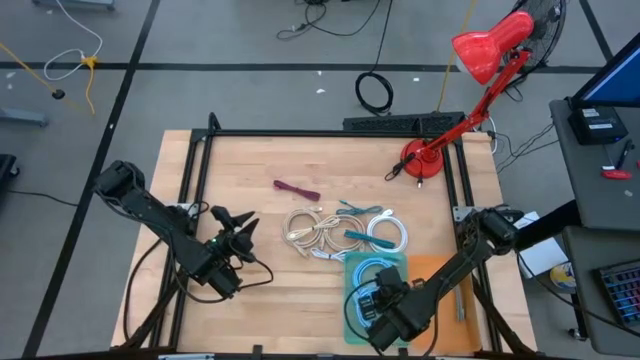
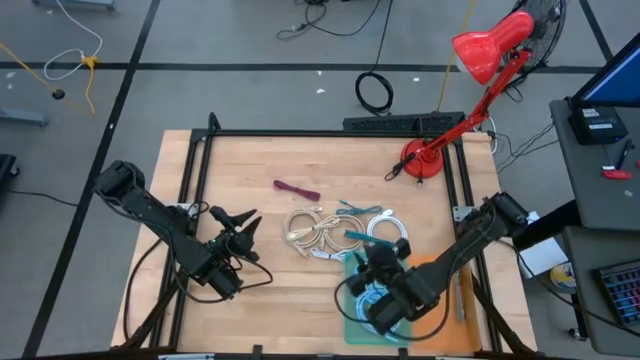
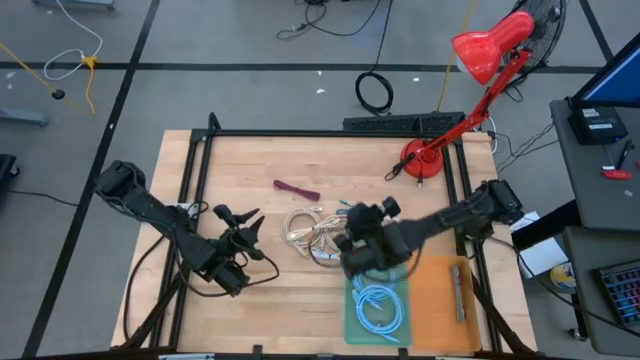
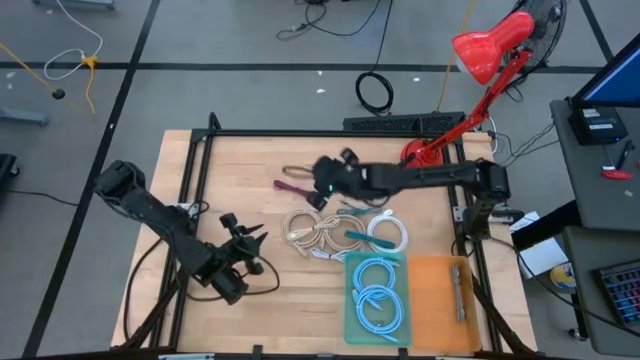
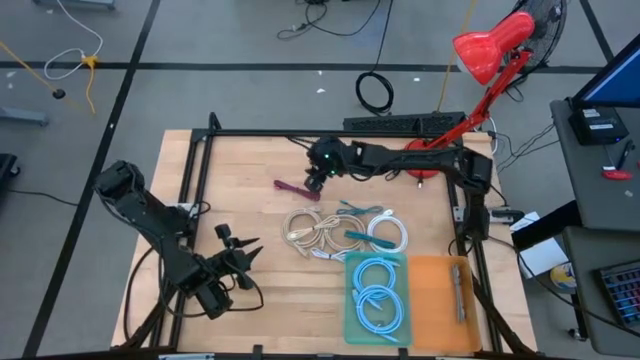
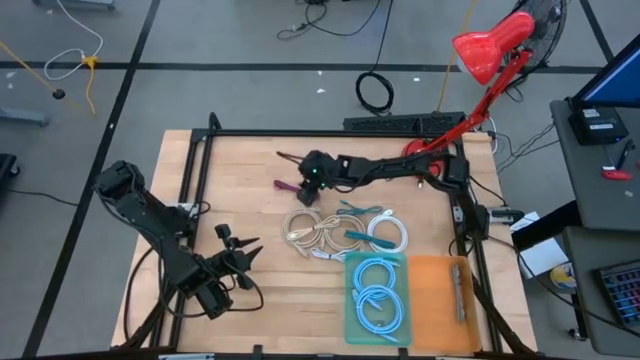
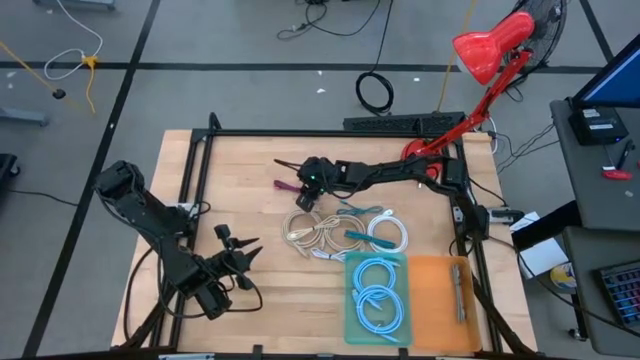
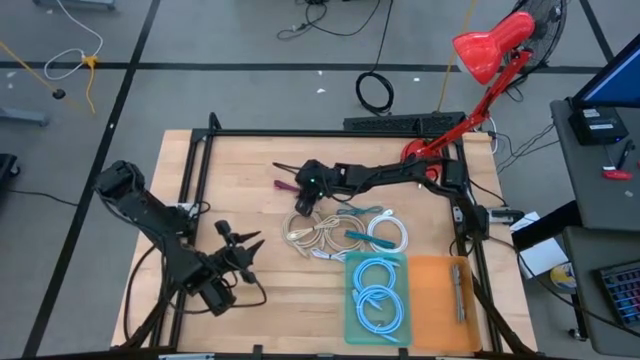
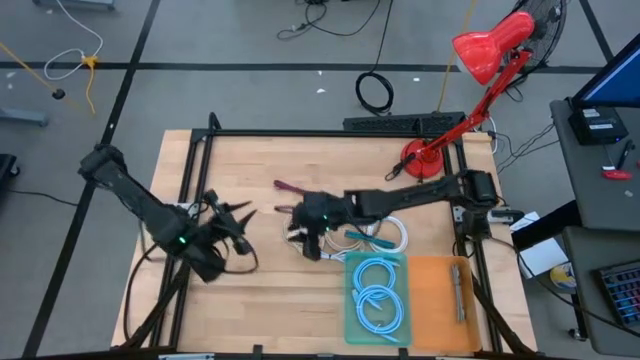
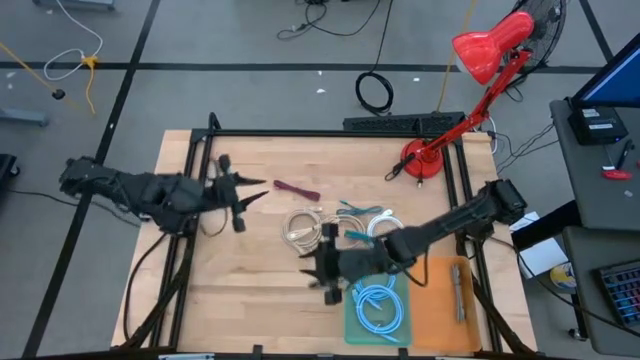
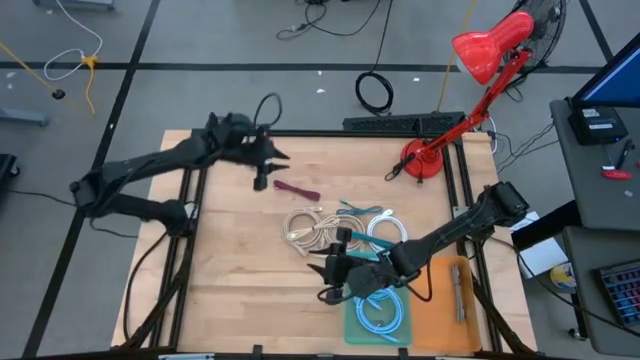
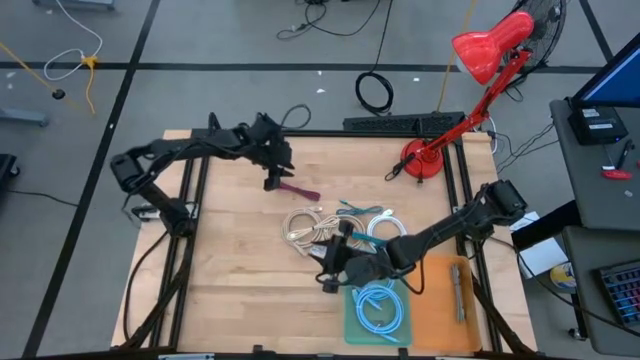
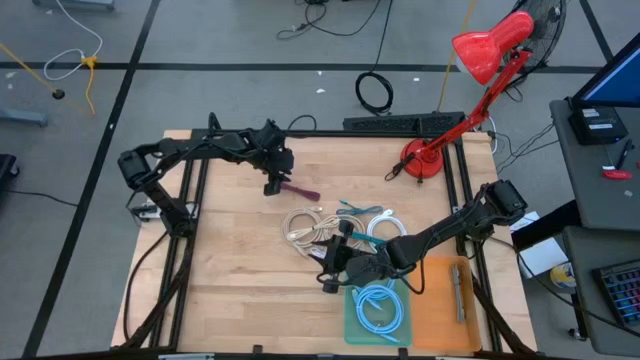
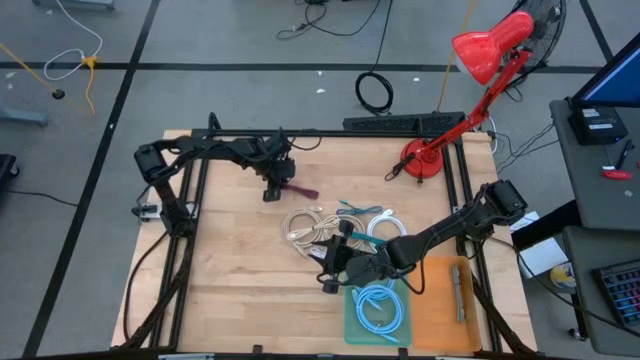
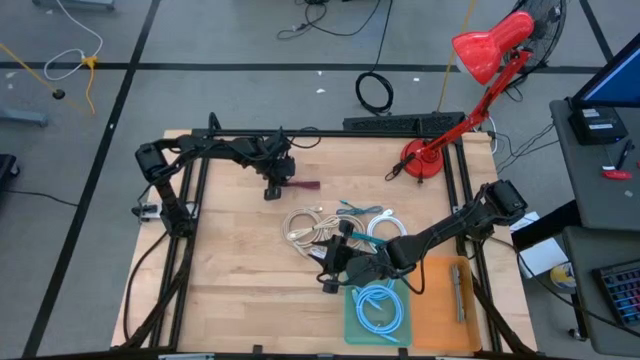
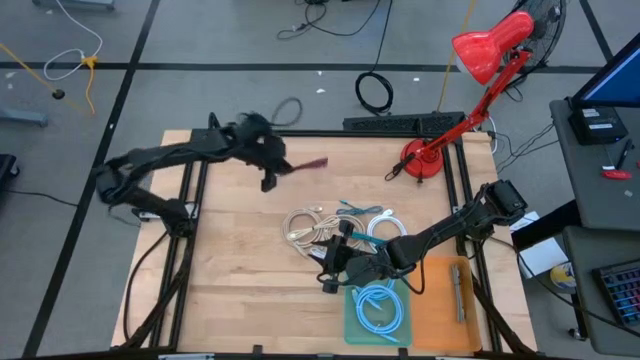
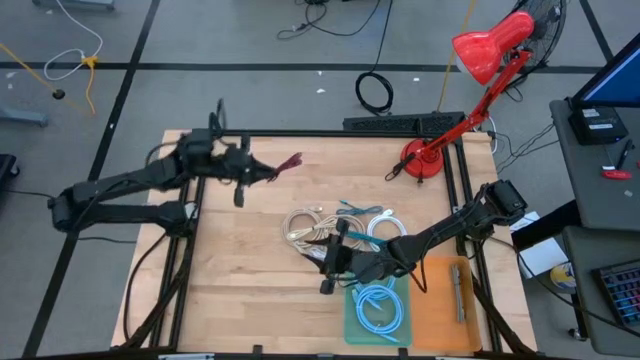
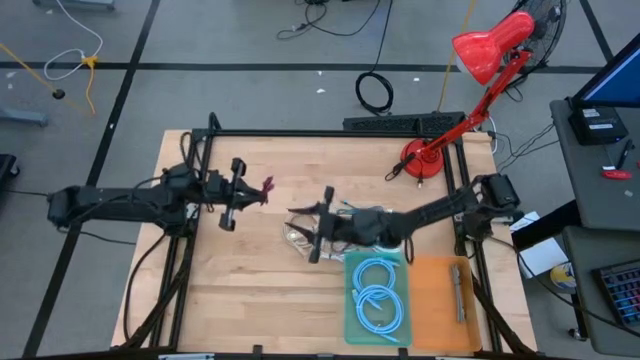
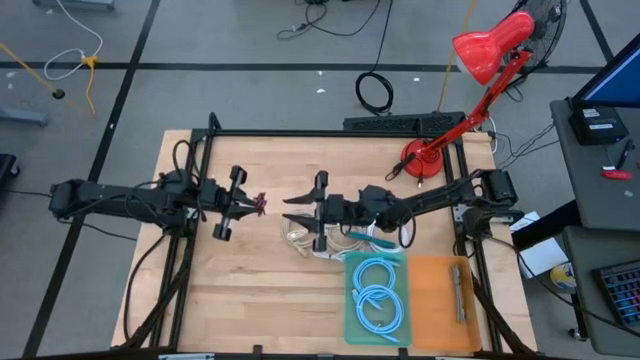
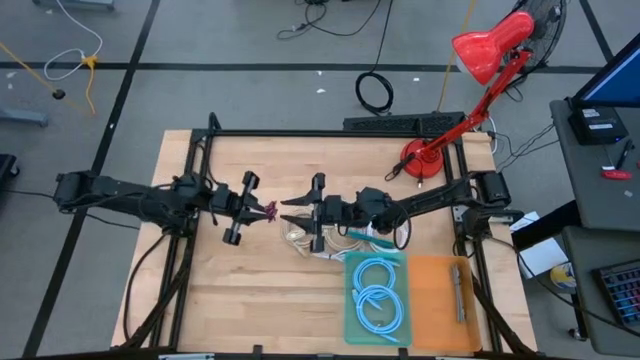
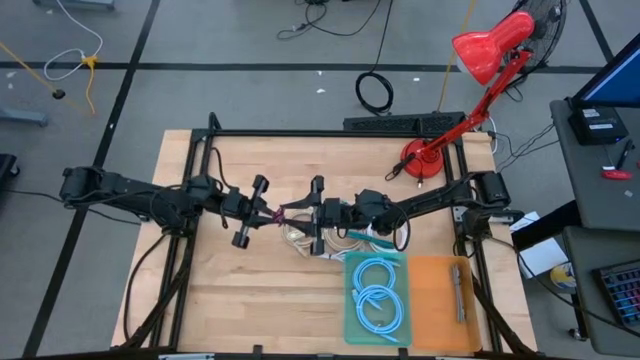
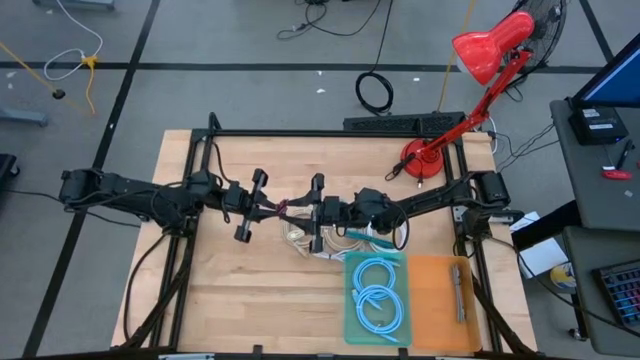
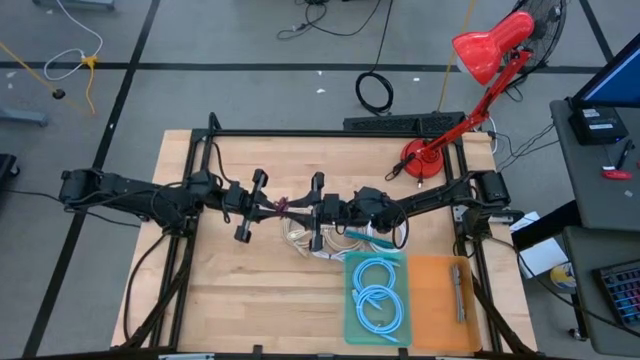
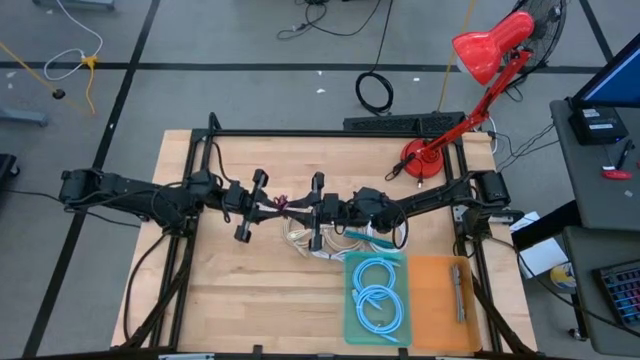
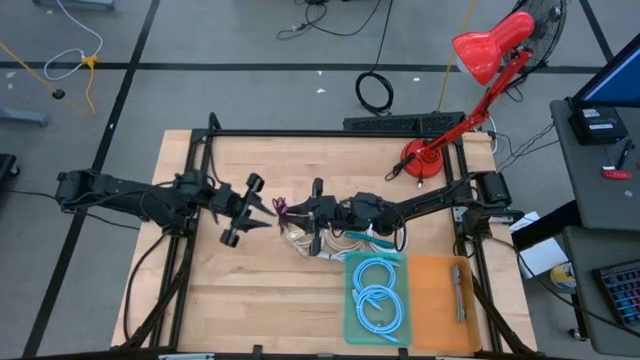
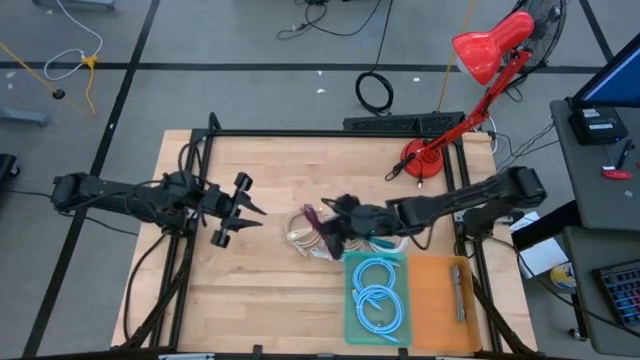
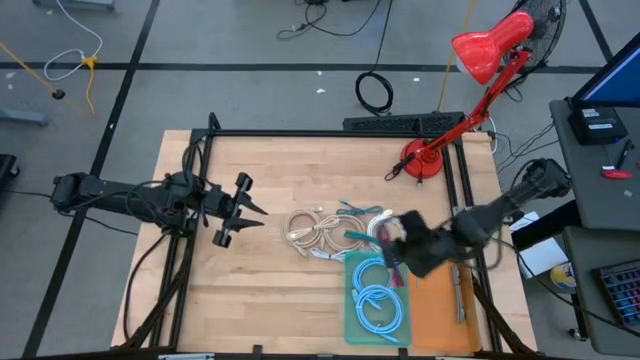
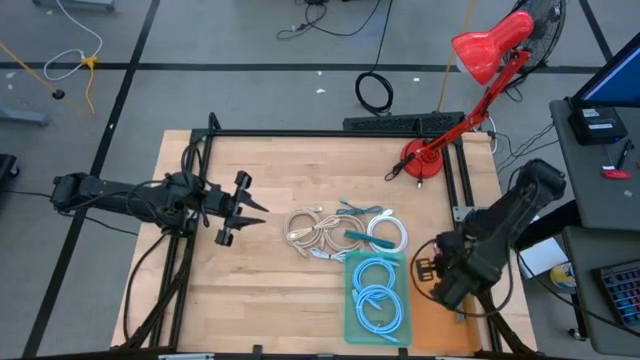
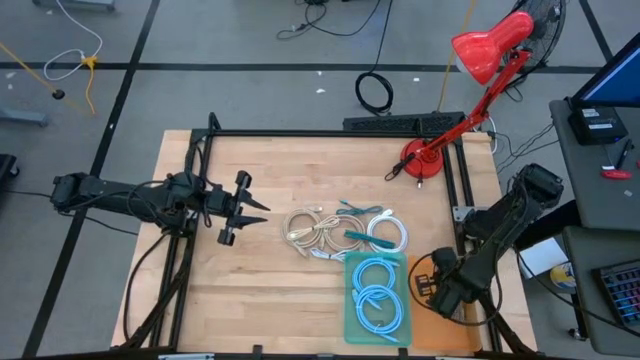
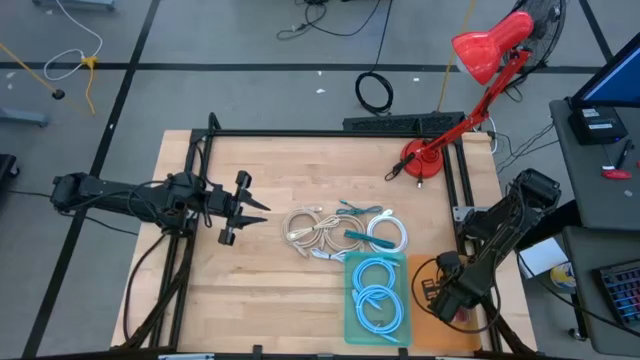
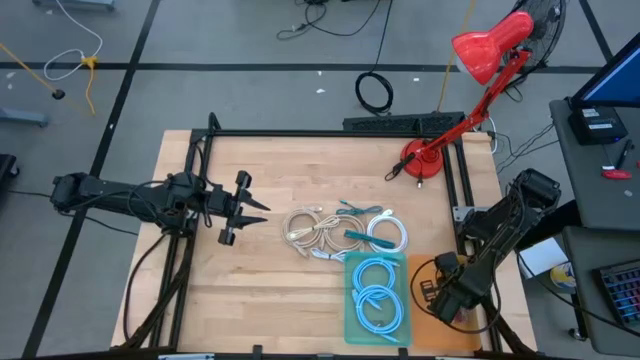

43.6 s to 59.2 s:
Task: Pick & Place USB Port
Put the pink charger cable into the orange bin

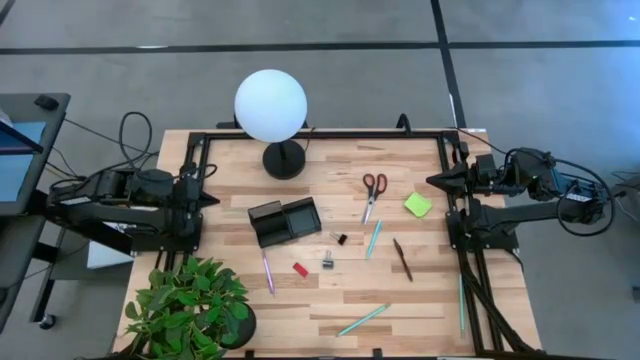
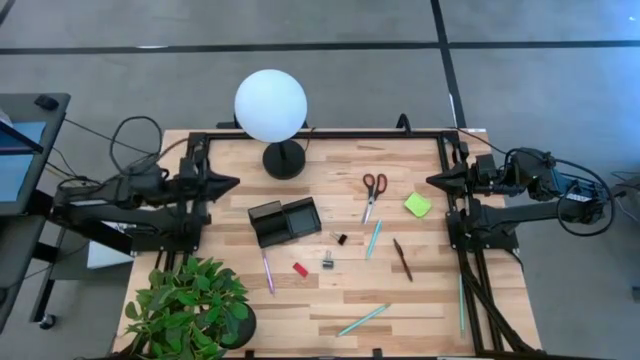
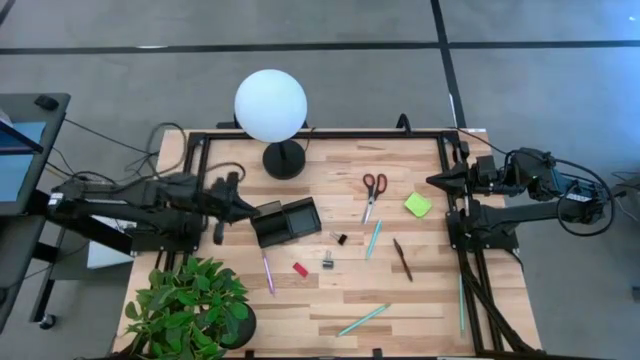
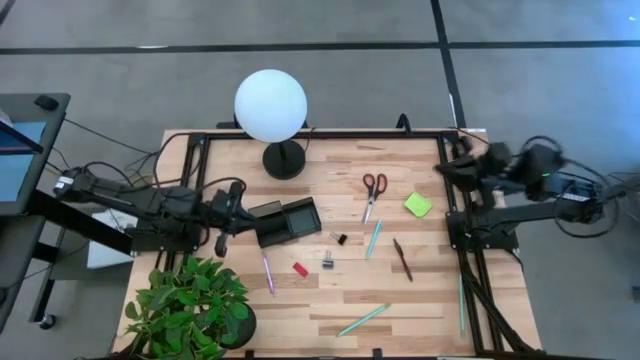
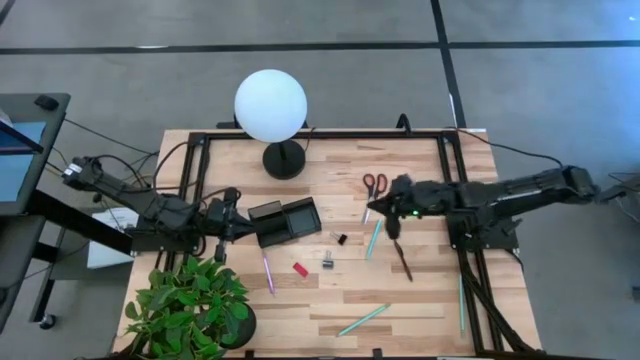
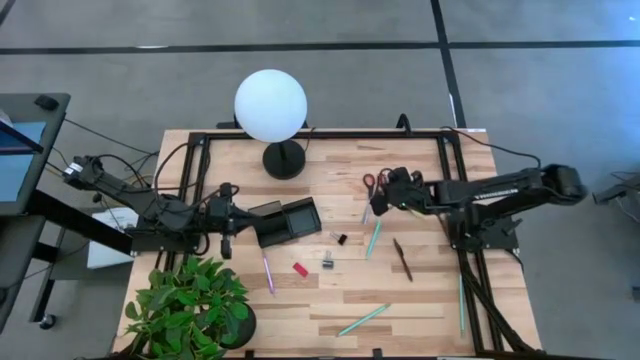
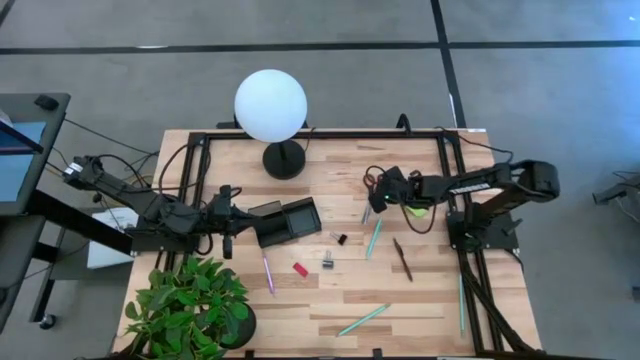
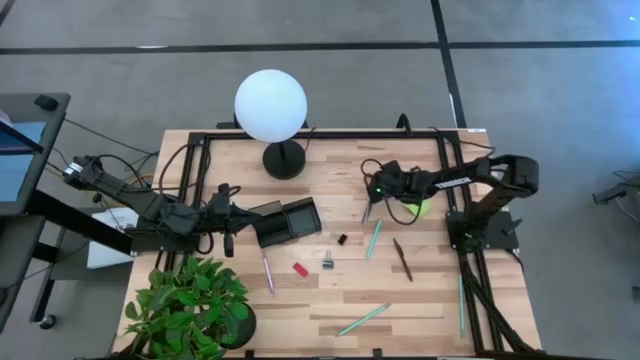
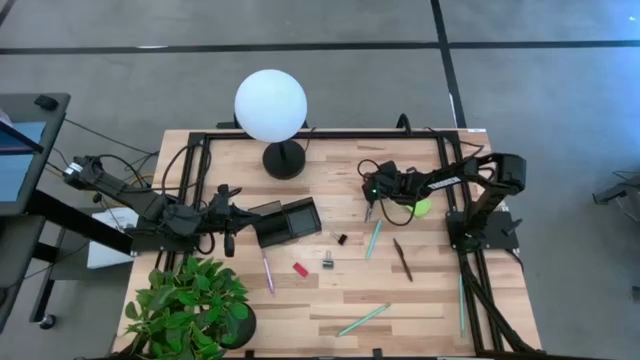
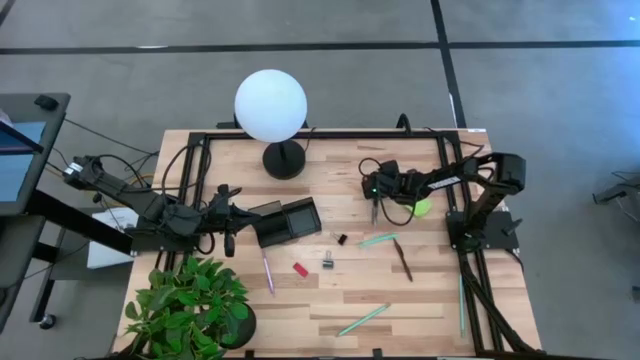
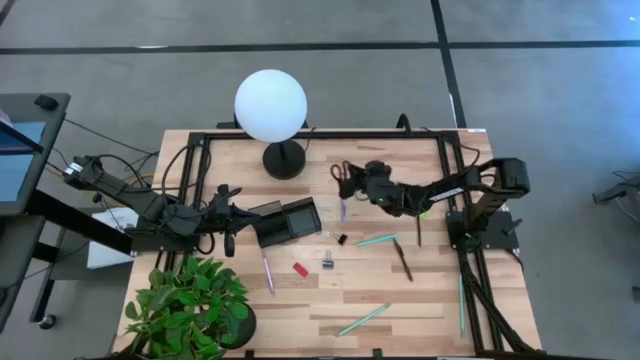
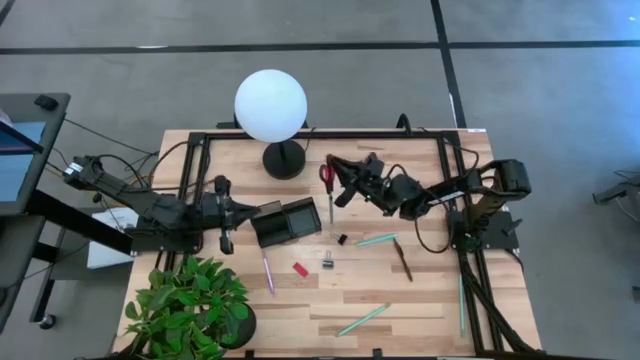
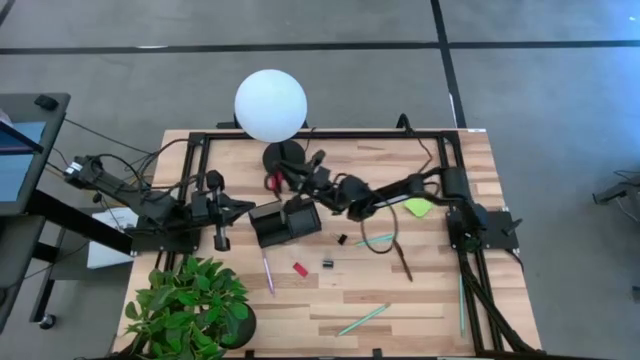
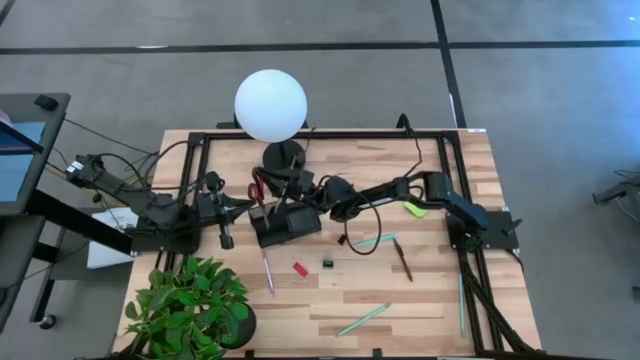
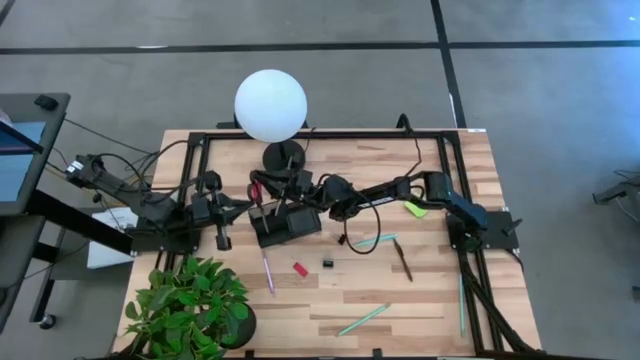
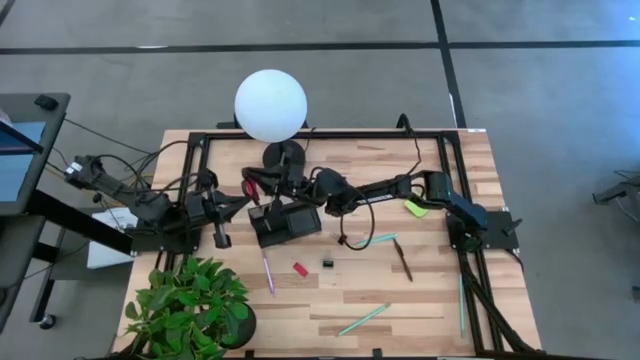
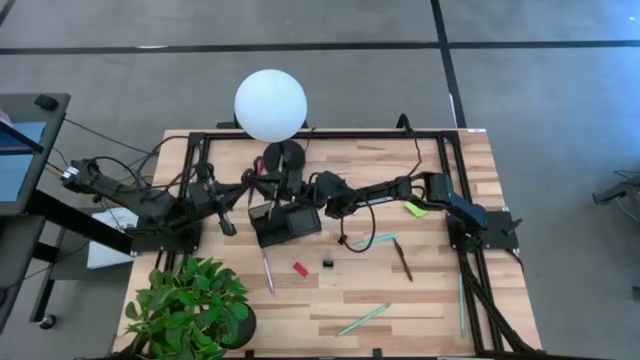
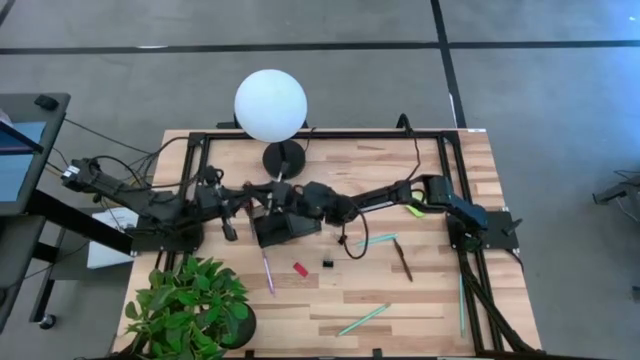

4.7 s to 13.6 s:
Task: Pick and place office supplies into organizer
Put the black scissors into the black desk organizer
